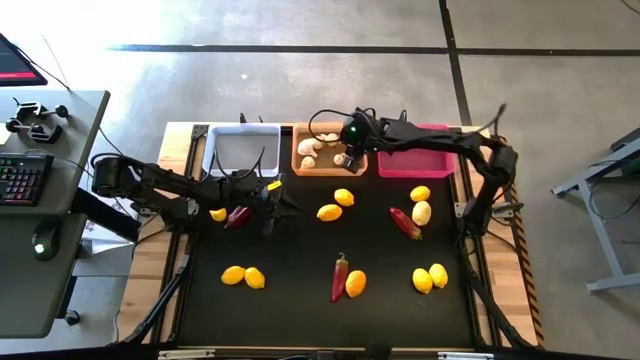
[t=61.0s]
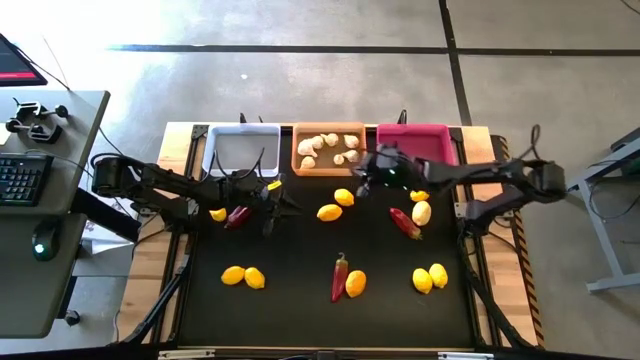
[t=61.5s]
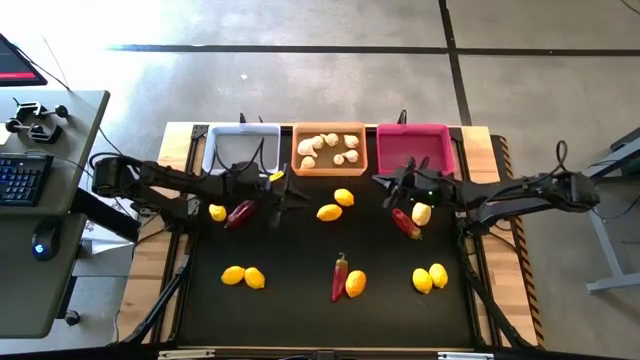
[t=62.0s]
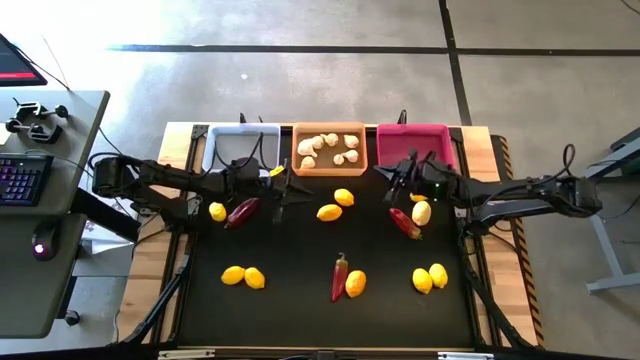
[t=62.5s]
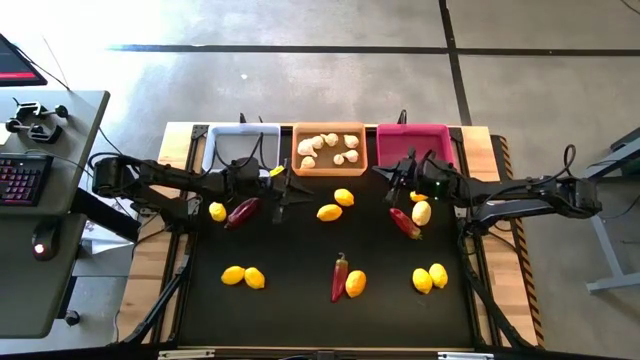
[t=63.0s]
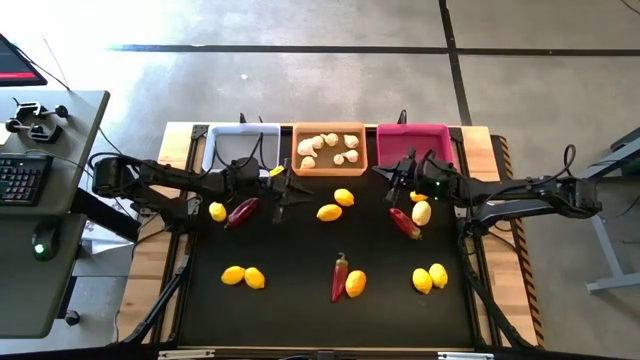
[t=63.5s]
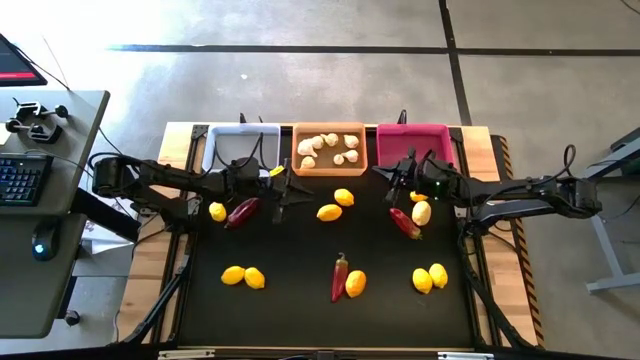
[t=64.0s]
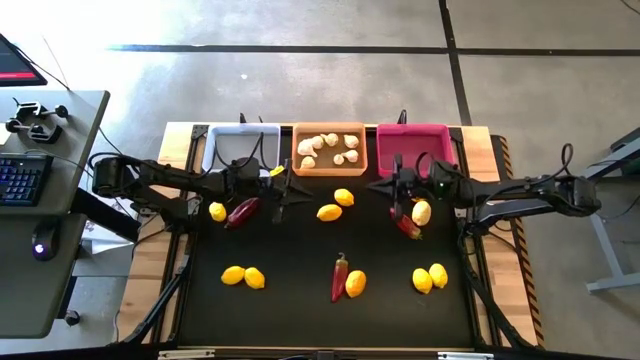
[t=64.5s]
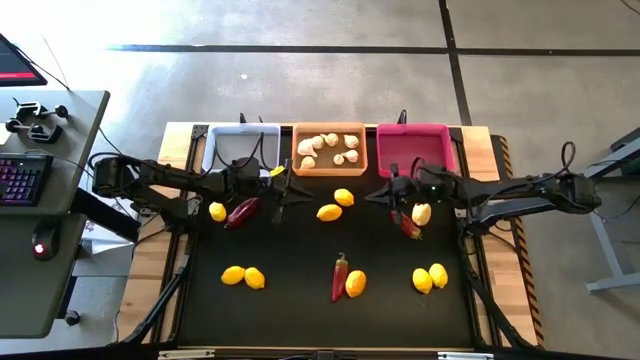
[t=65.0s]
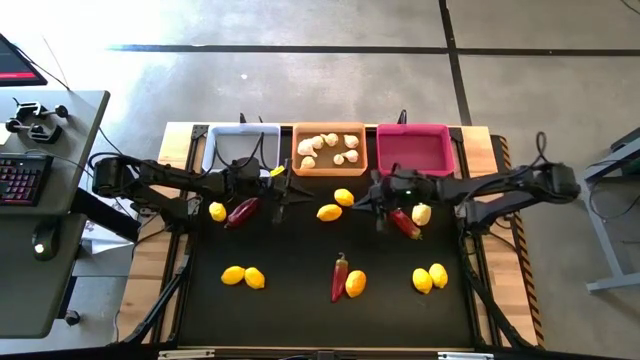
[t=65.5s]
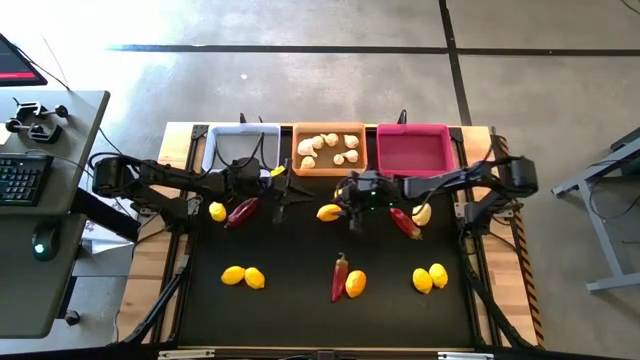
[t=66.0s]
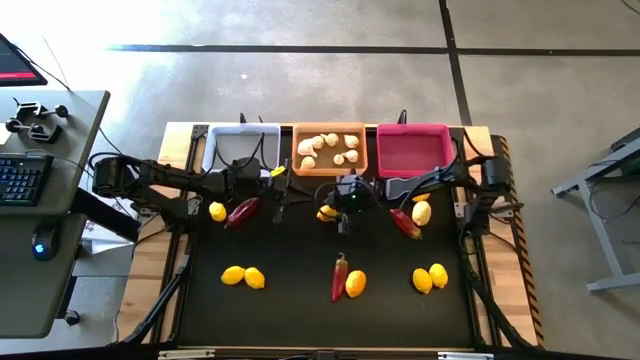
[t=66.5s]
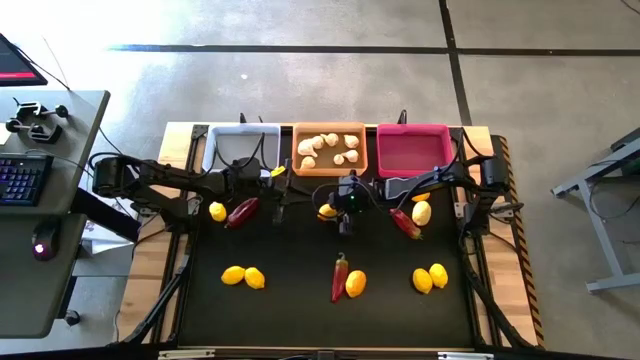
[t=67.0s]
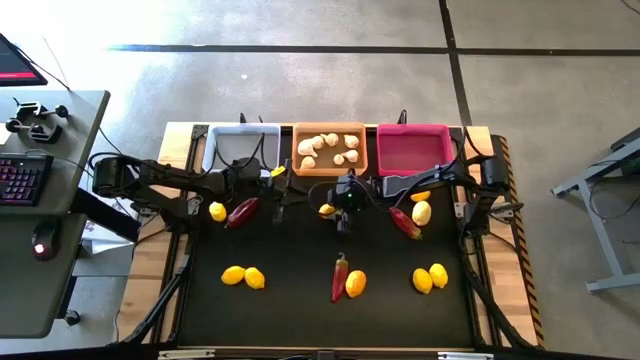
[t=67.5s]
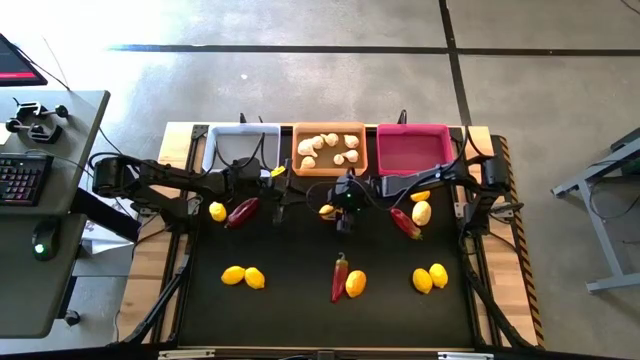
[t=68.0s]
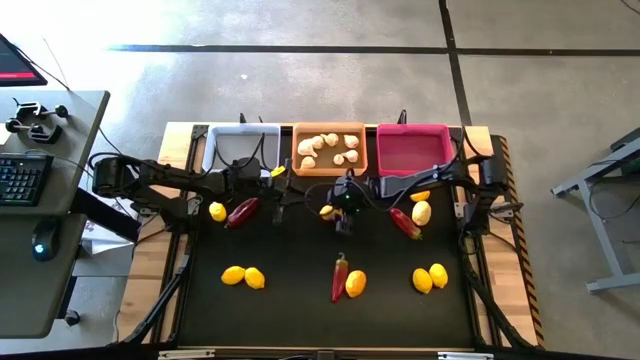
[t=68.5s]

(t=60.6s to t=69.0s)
Task: Sort produce into baskets
Put the yellow lemon into the pink bin

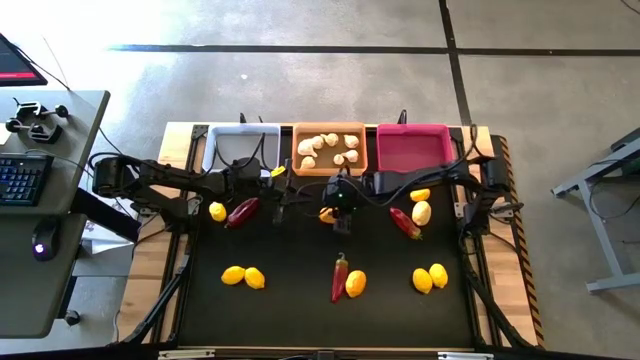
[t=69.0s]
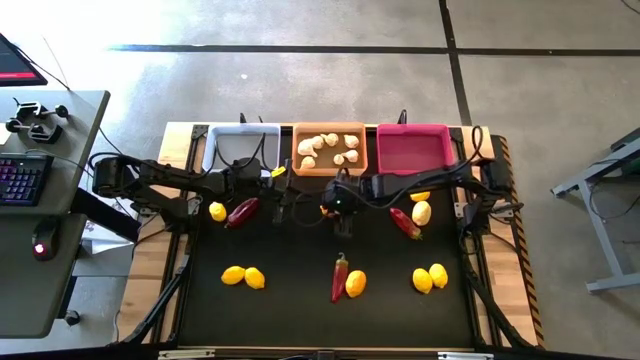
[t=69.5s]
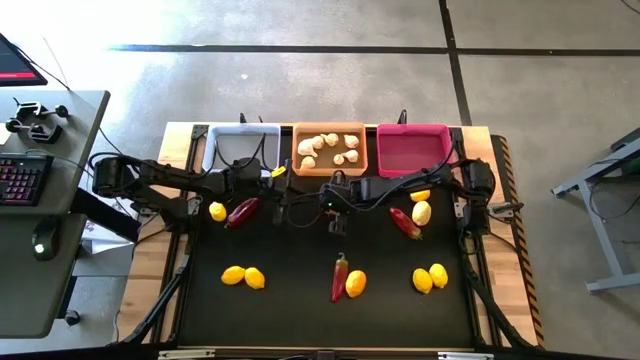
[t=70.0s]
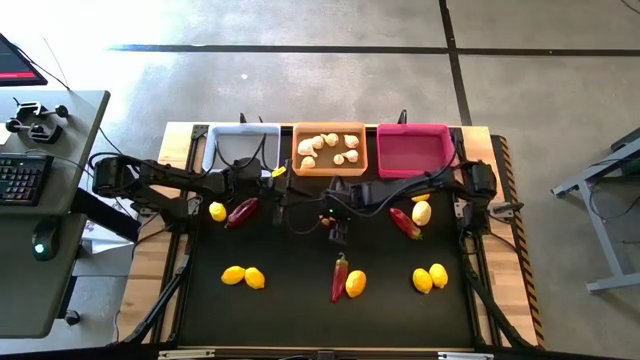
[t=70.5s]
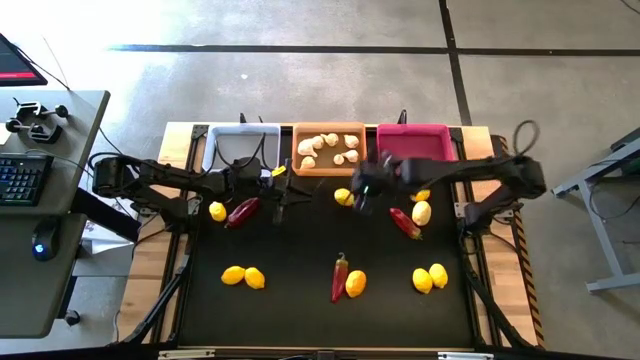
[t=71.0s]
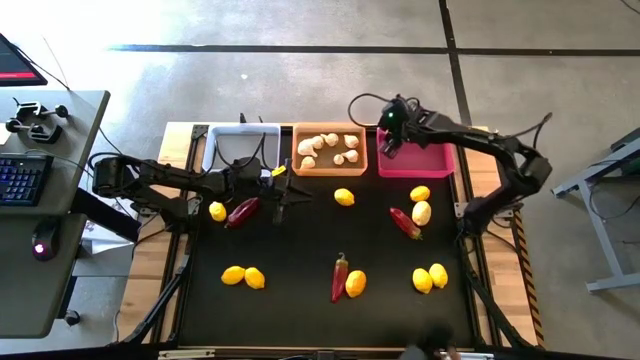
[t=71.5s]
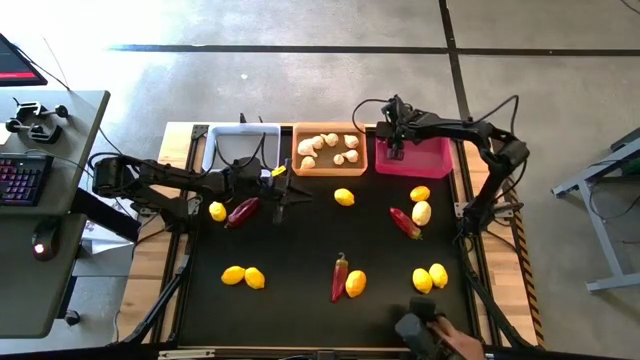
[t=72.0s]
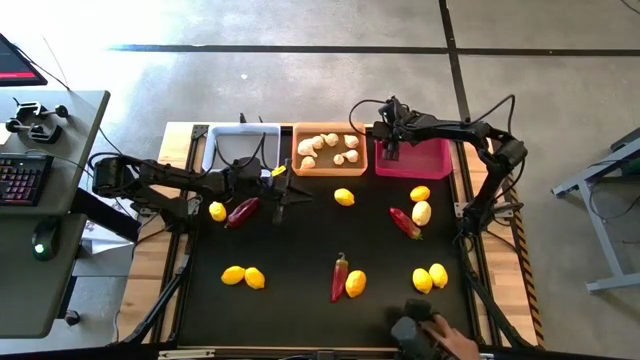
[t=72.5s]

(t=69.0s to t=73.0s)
Put the yellow lemon into the pink bin

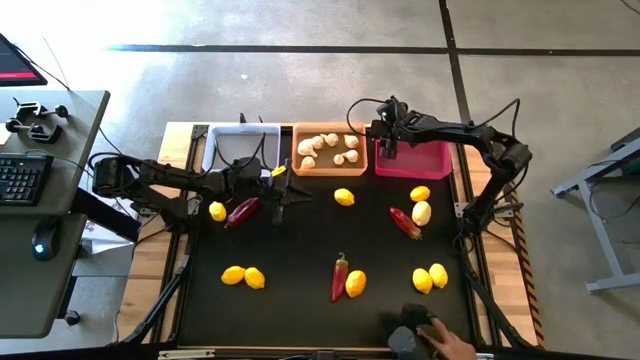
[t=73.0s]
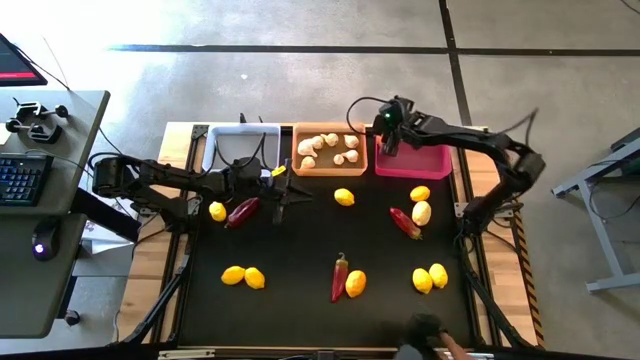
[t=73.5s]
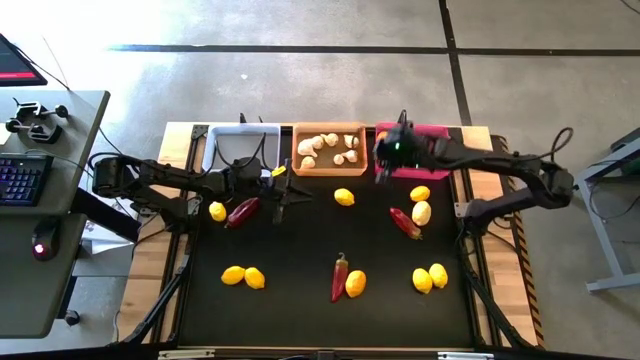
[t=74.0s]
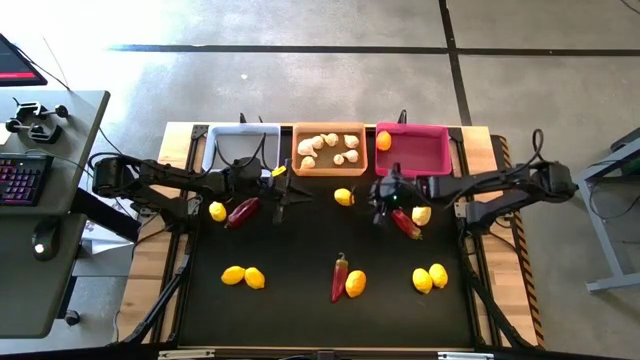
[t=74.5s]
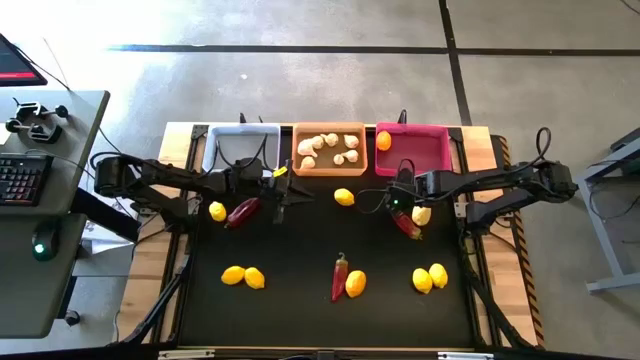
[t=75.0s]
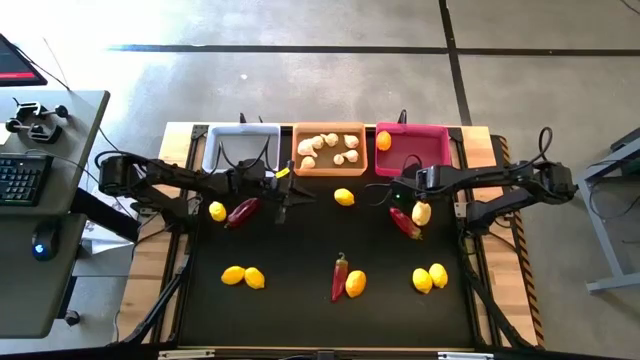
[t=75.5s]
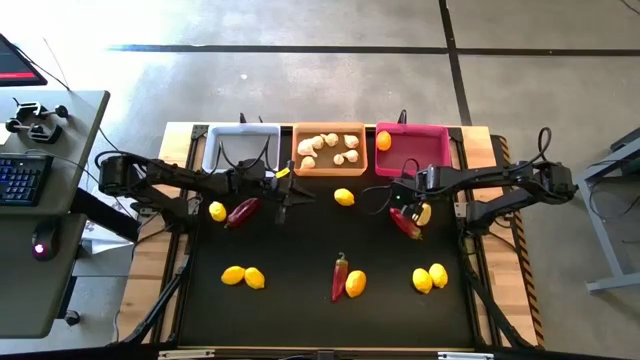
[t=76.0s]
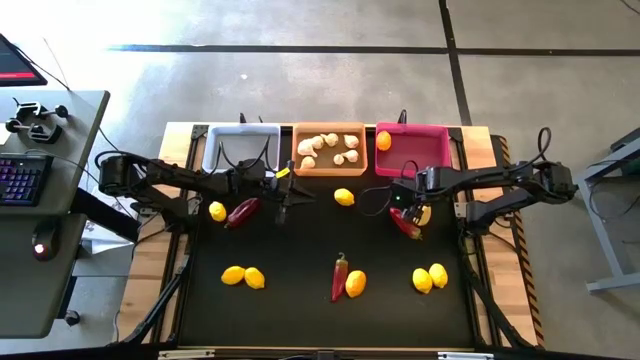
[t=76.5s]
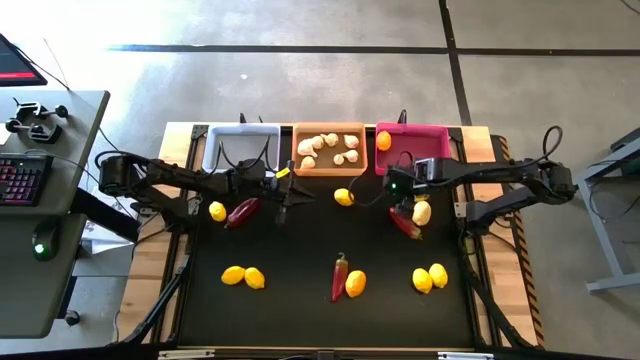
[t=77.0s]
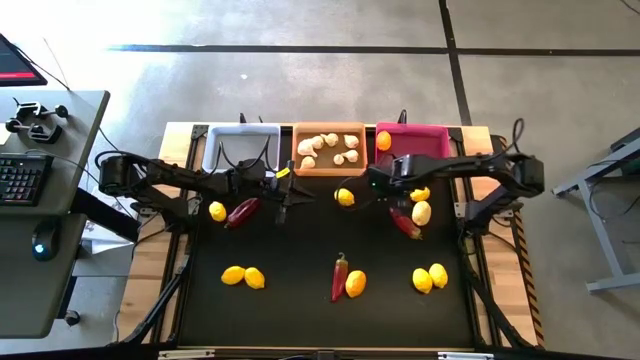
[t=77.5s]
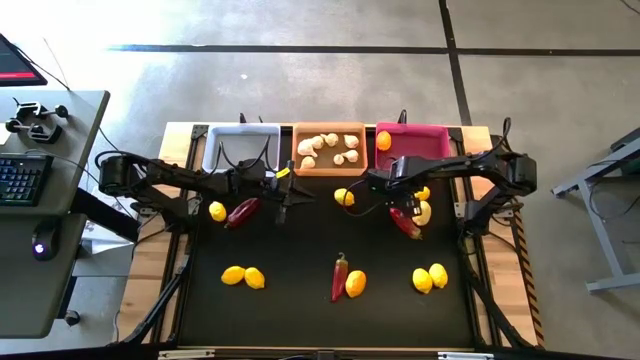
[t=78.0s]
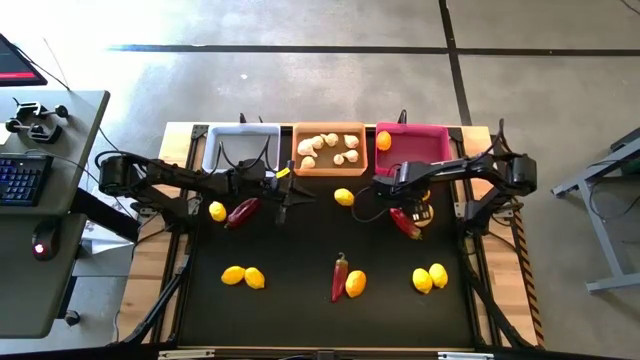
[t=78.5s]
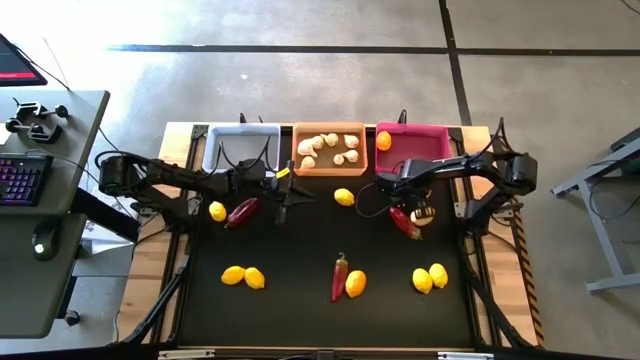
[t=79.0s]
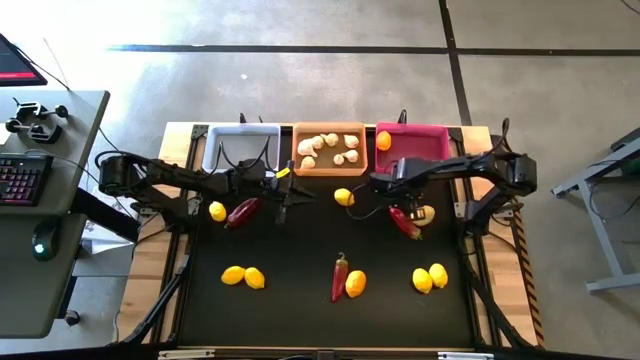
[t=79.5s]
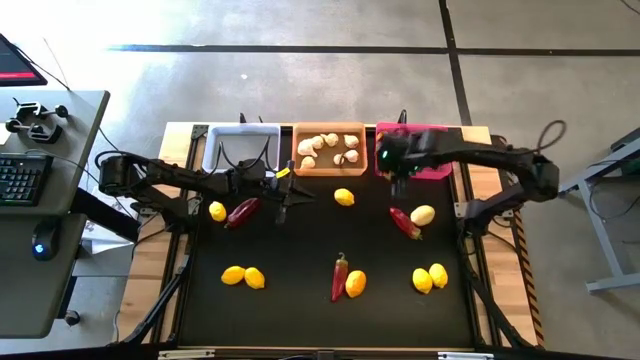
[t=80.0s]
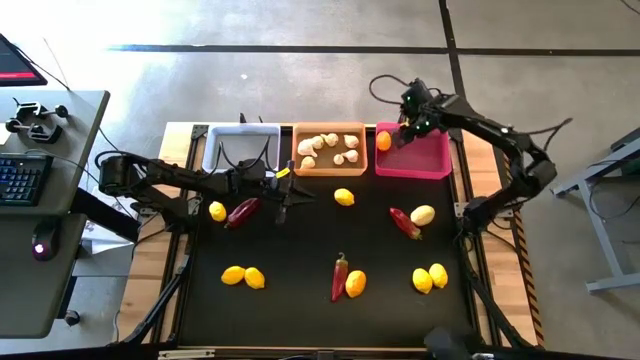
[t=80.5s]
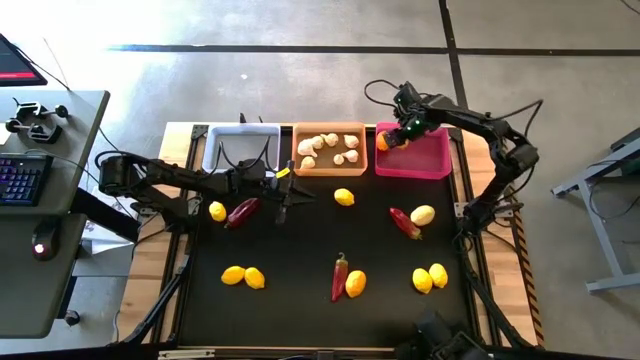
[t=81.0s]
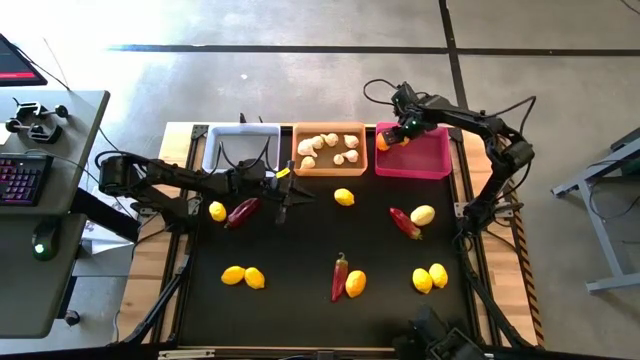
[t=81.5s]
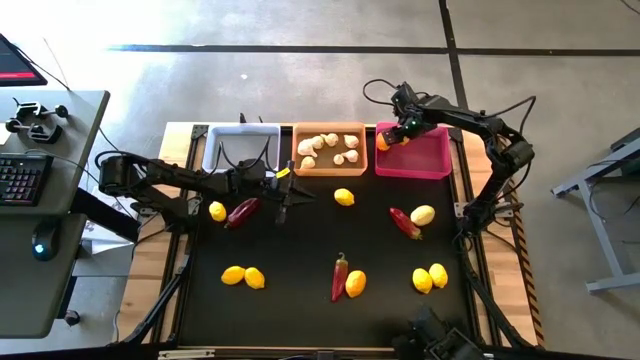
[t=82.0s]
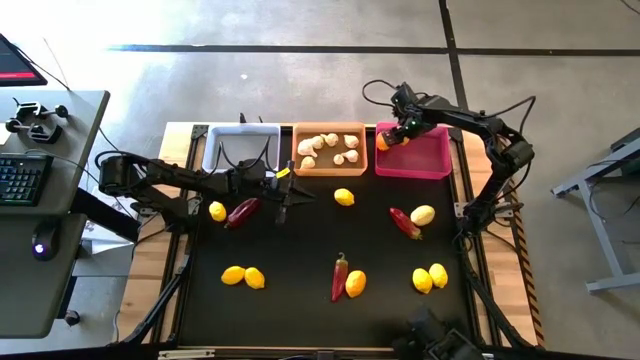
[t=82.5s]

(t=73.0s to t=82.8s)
Put the yellow lemon into the pink bin
